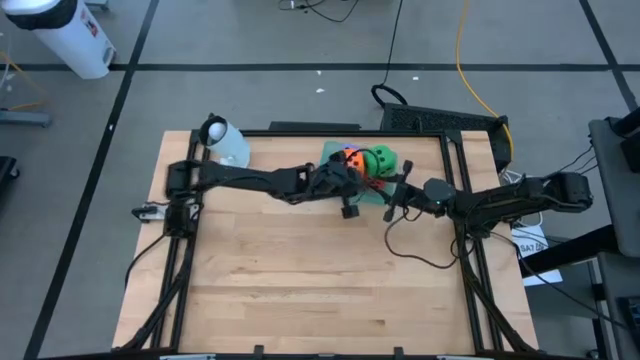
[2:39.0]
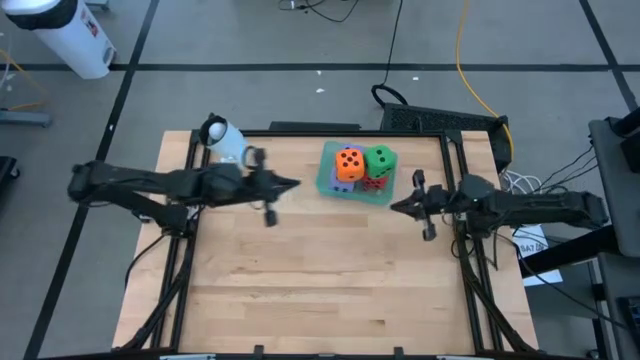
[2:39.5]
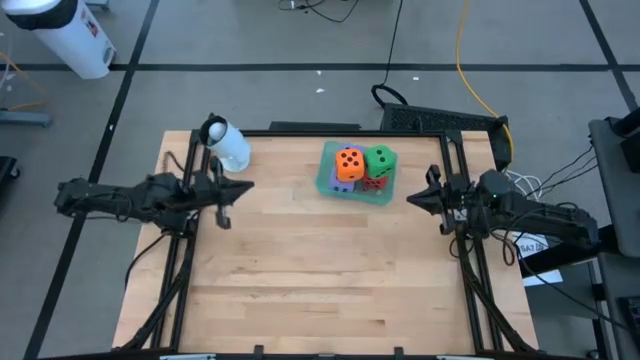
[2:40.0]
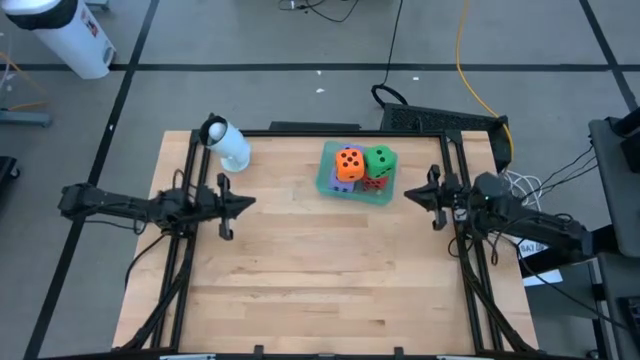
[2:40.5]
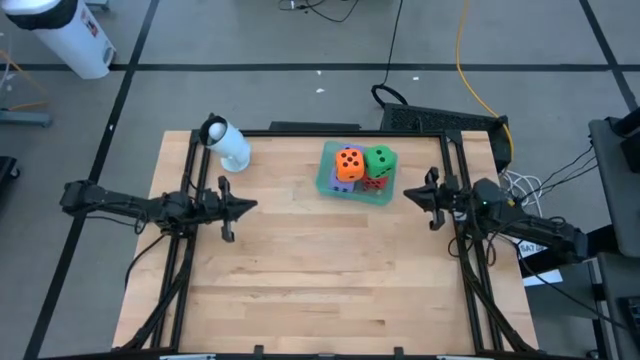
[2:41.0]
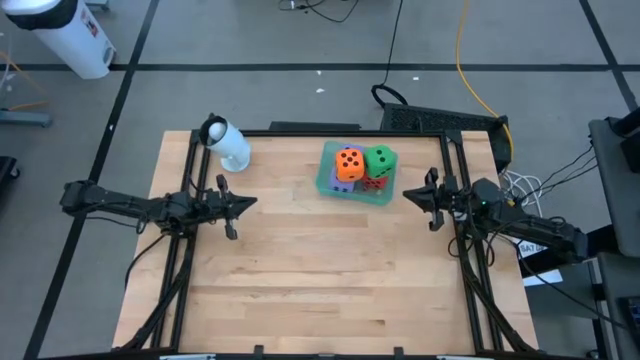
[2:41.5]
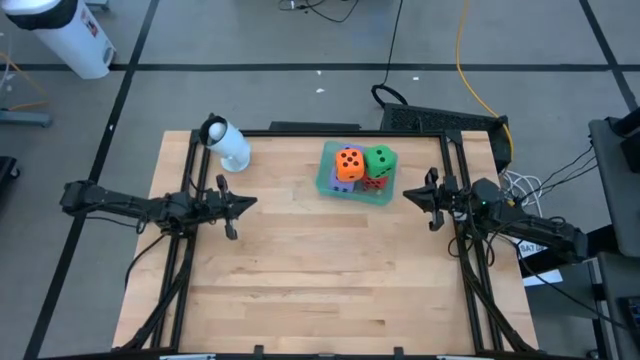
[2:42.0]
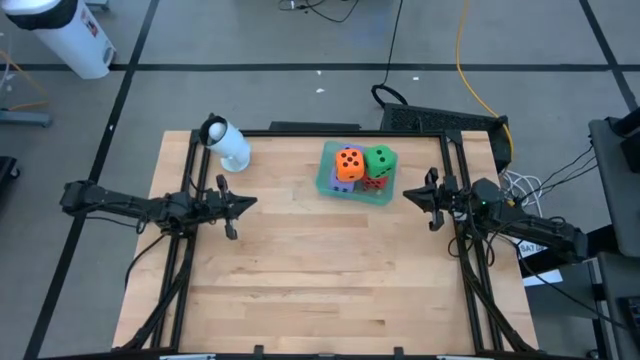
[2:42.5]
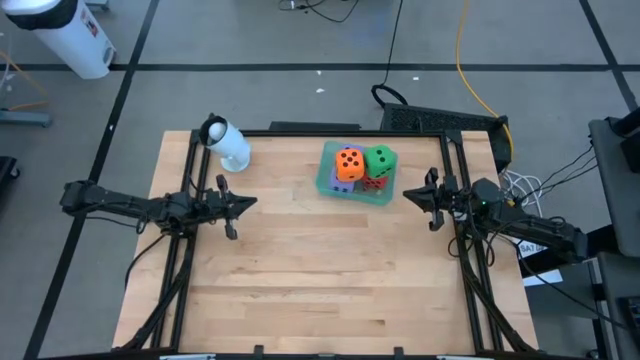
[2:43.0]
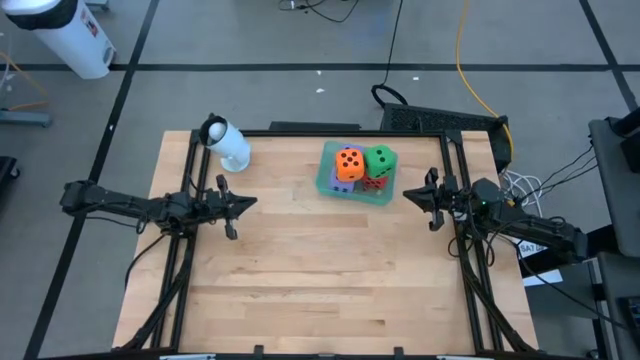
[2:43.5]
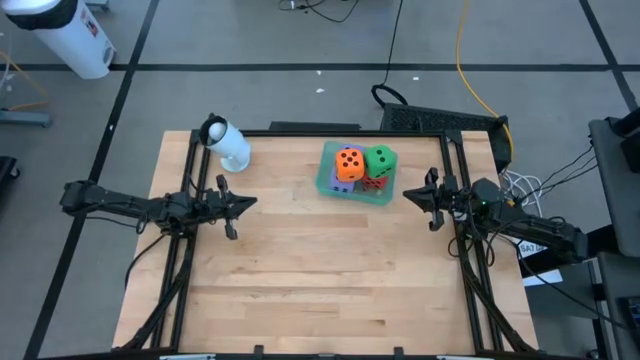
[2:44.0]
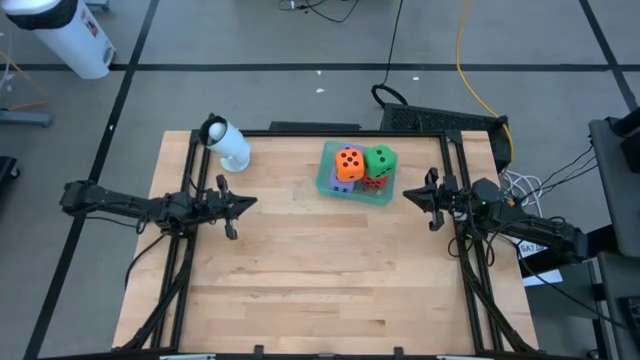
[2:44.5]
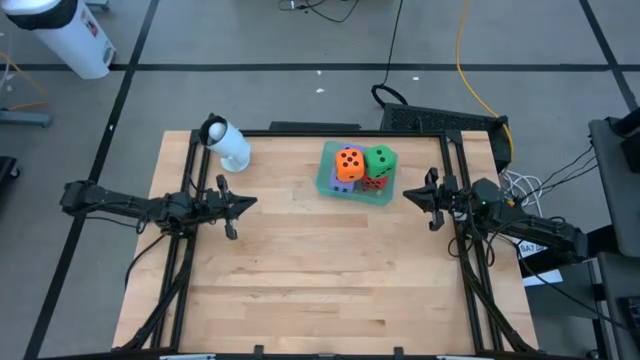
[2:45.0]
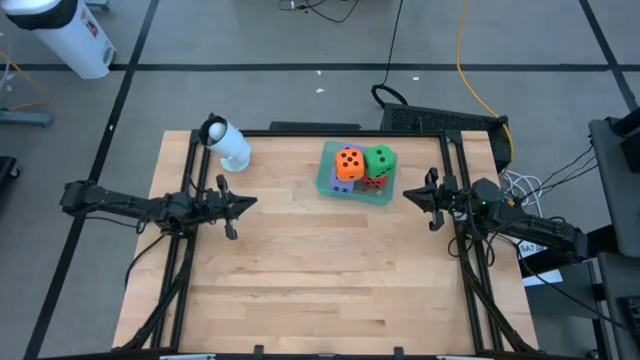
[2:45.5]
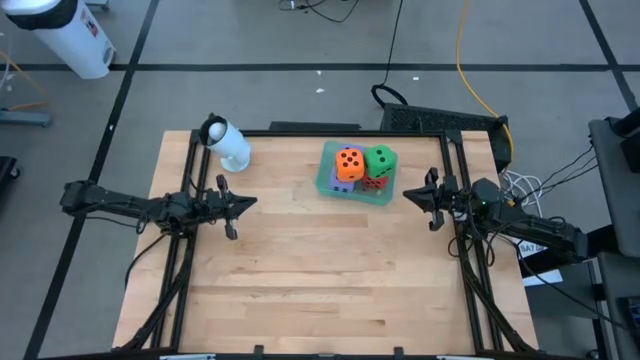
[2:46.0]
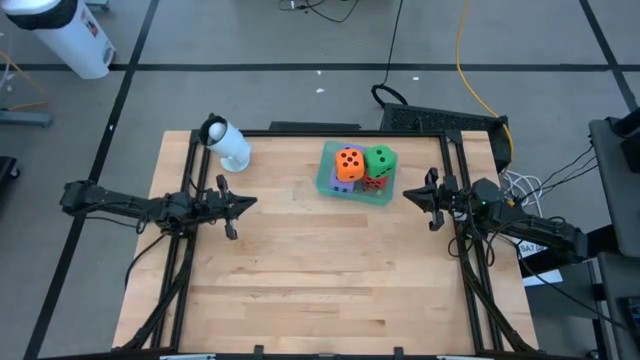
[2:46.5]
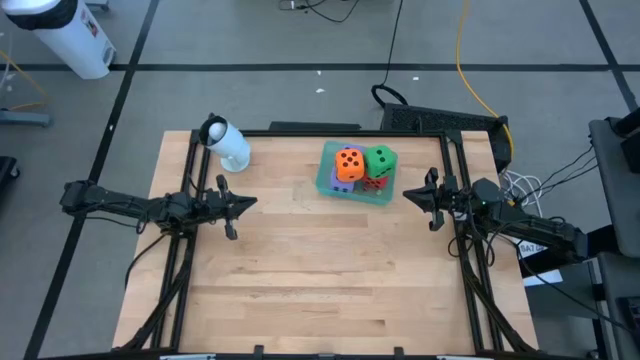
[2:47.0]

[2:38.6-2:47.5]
Task: Pick & Place Dice
Return to Home Position

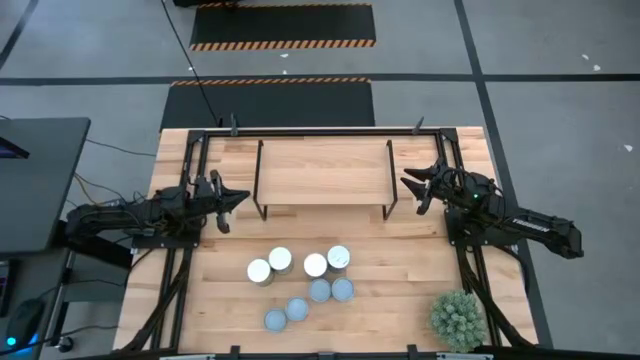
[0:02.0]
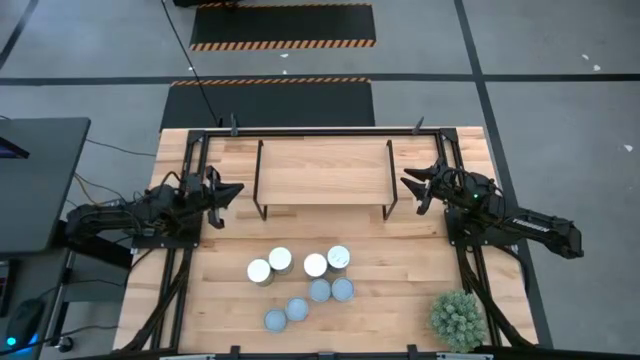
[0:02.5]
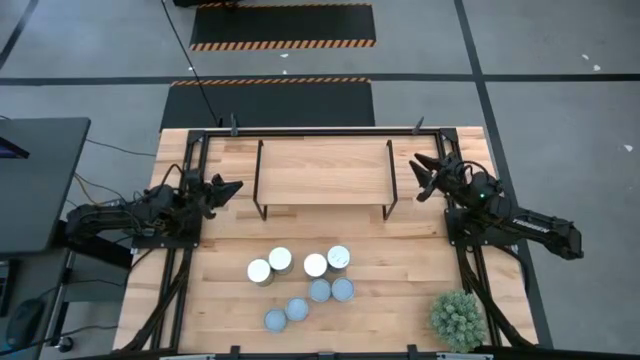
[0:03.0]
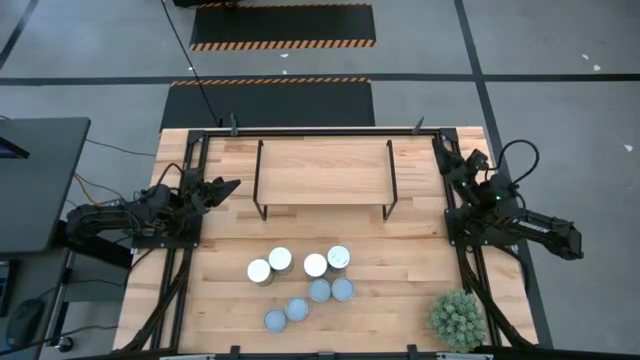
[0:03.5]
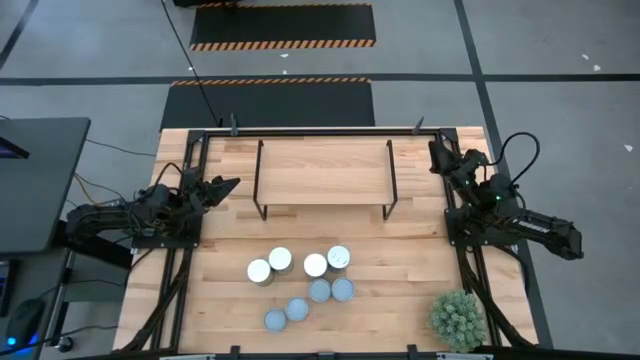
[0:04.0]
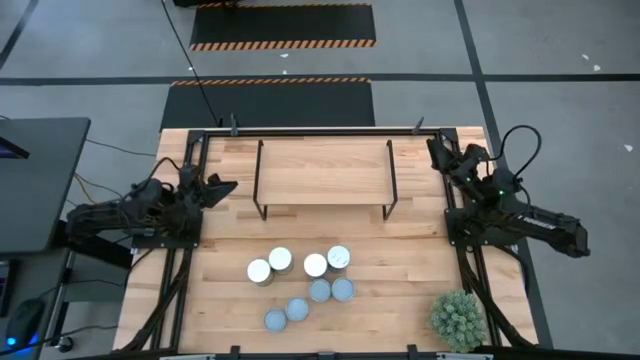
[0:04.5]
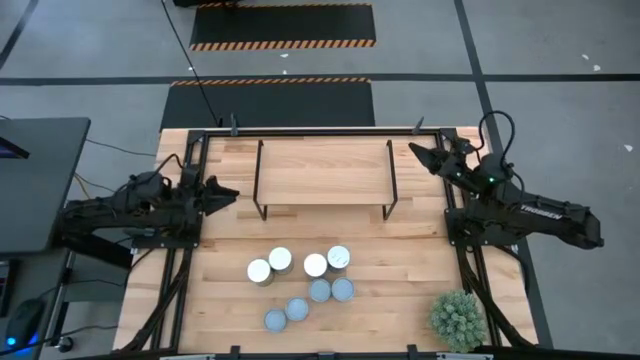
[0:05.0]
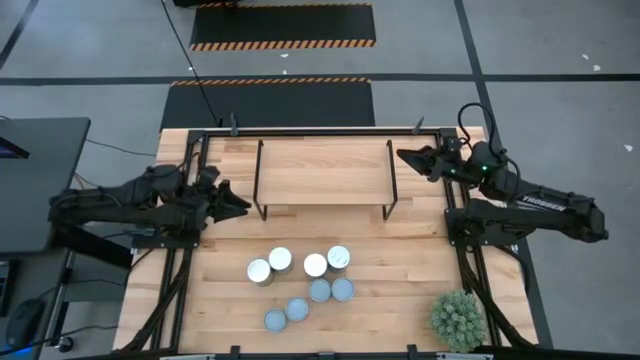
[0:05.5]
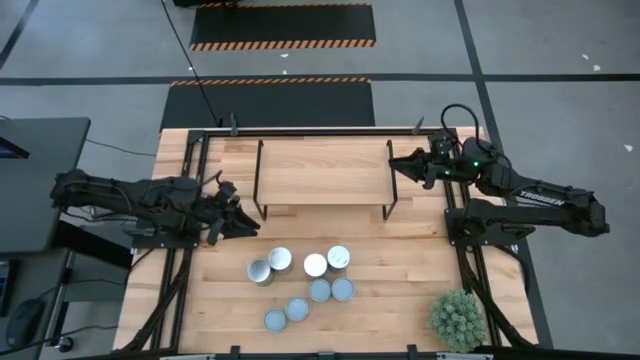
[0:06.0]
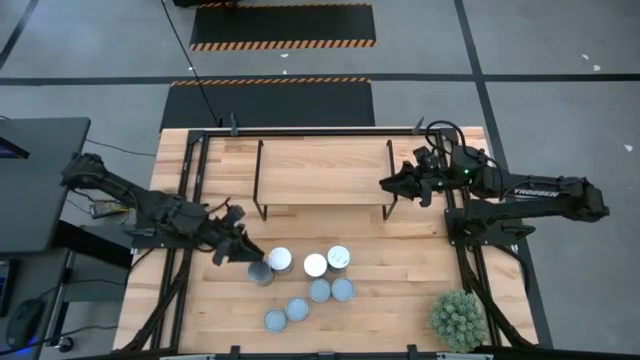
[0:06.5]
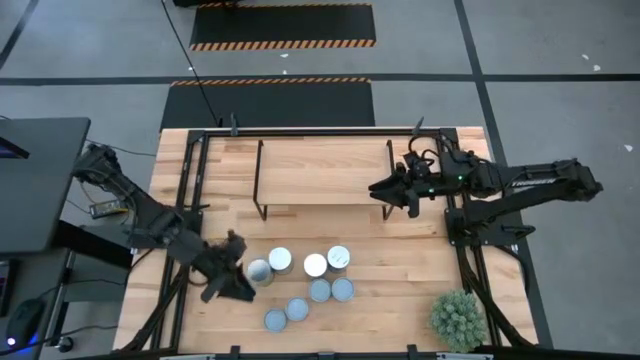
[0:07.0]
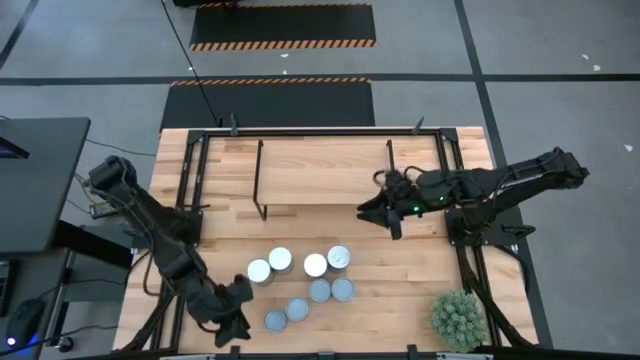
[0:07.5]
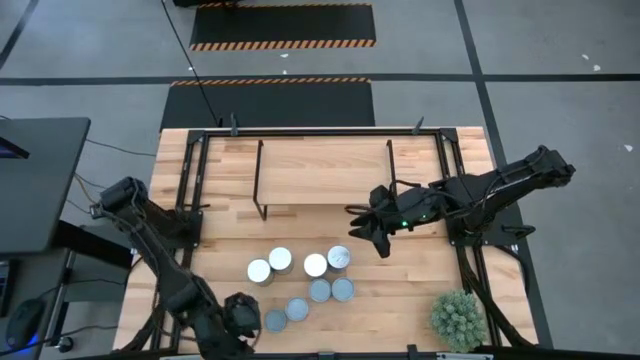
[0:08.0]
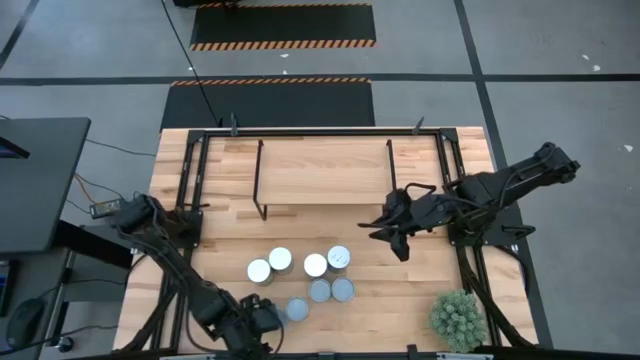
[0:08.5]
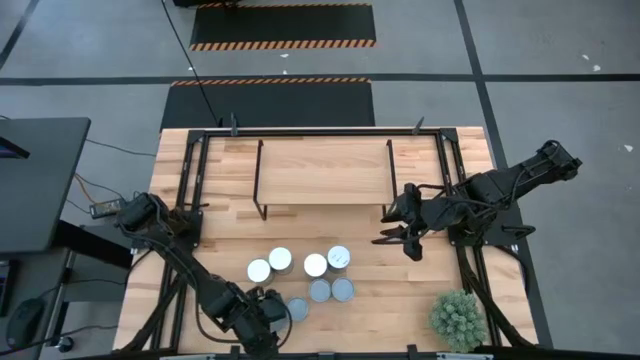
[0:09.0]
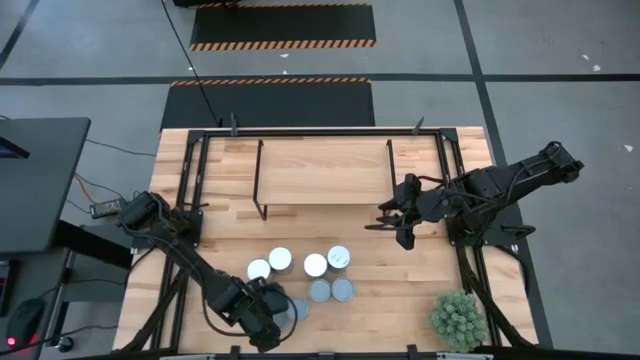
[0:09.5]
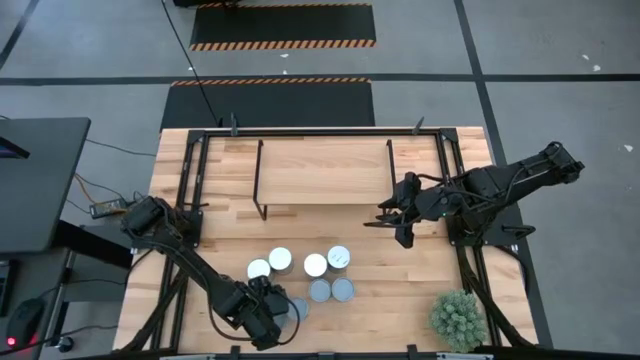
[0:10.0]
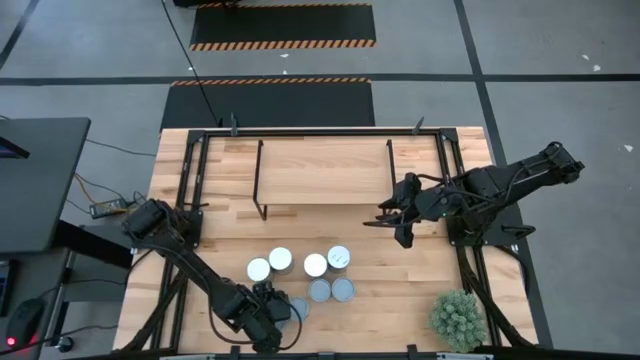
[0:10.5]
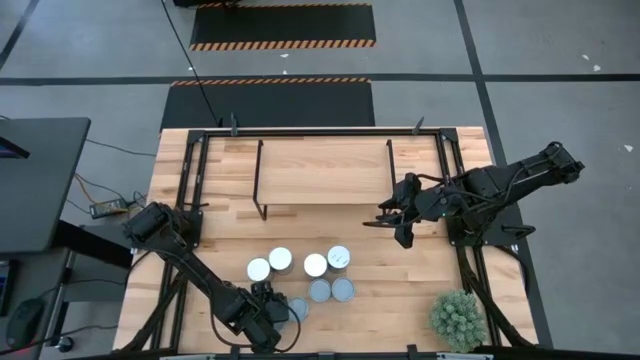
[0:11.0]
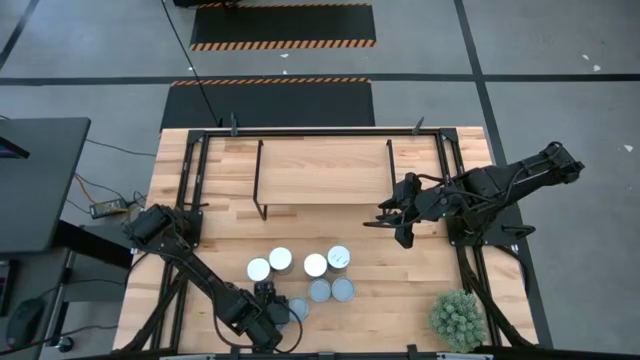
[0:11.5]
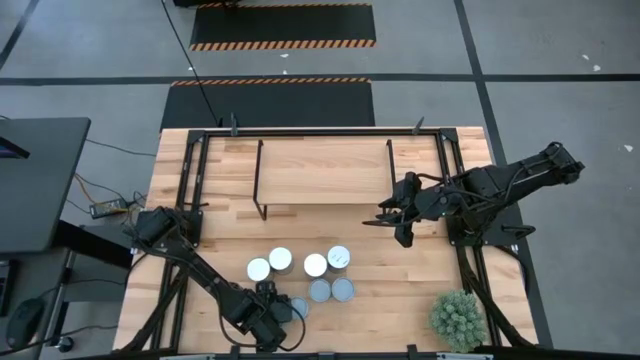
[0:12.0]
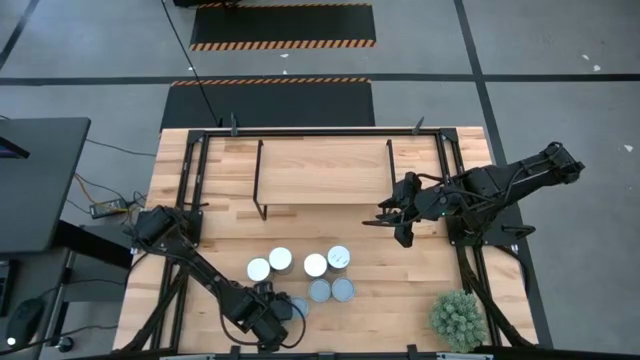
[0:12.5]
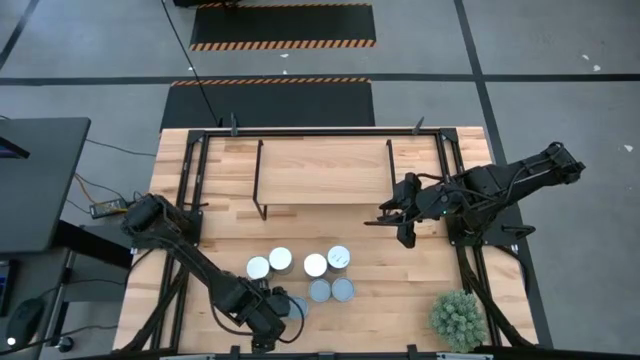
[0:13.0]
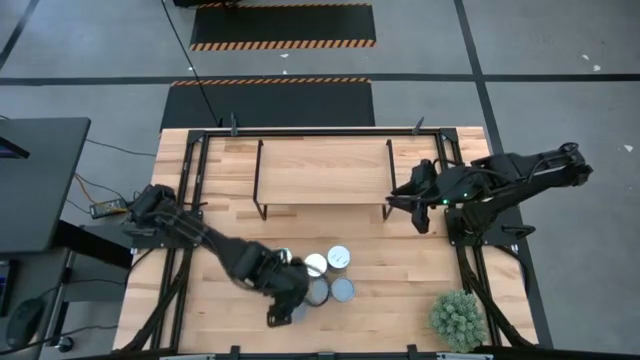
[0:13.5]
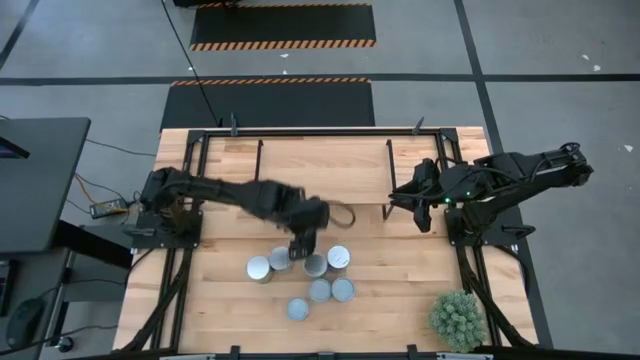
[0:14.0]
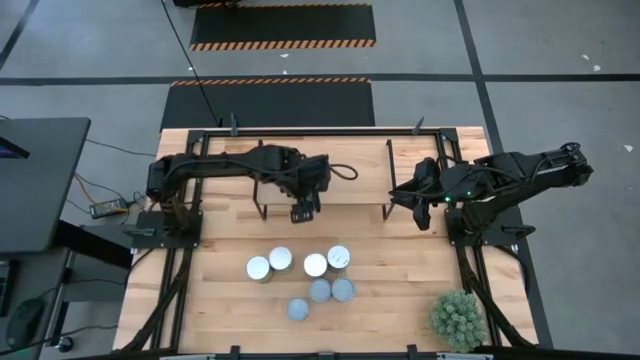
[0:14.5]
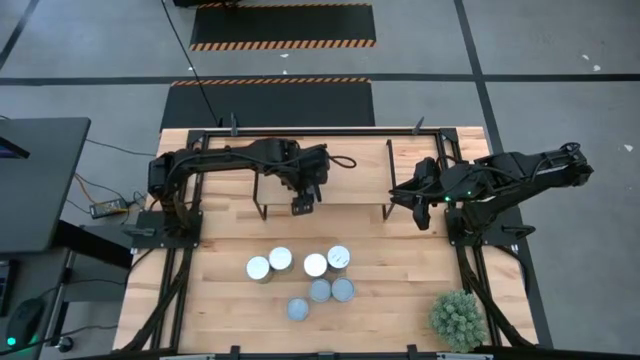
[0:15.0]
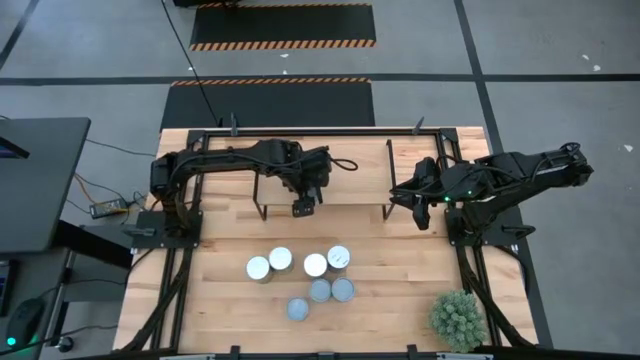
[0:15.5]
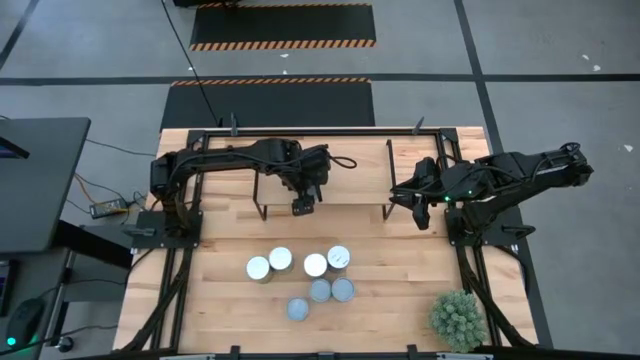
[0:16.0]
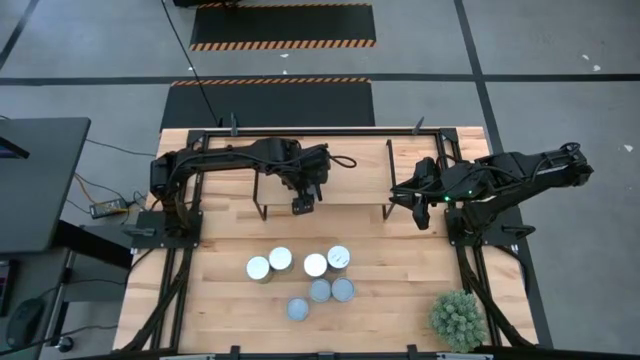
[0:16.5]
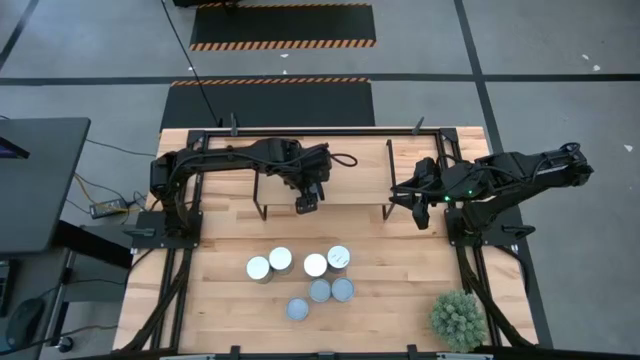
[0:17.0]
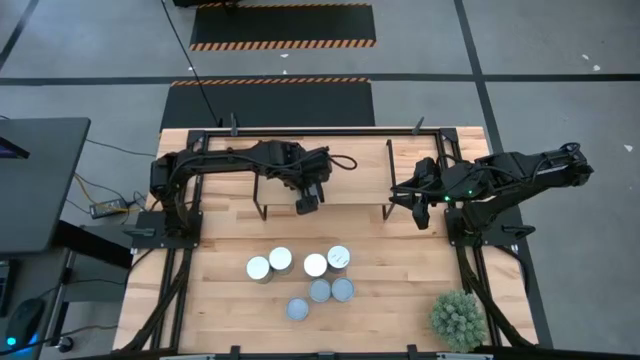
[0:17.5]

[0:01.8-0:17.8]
Task: Pick and place cans onto a shelf
Put the canned tuna on the shelf
